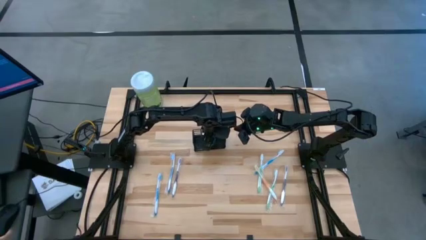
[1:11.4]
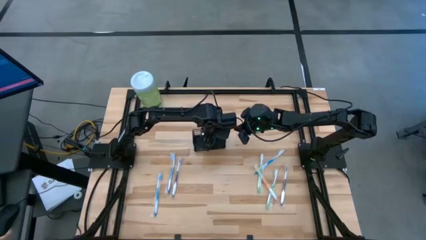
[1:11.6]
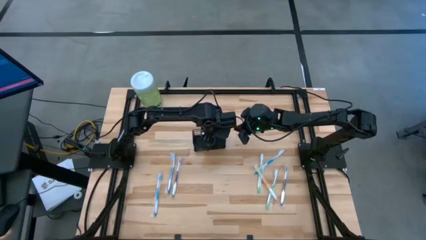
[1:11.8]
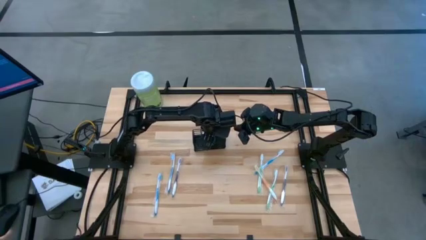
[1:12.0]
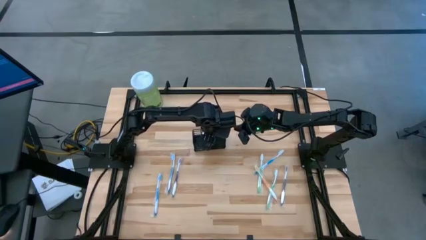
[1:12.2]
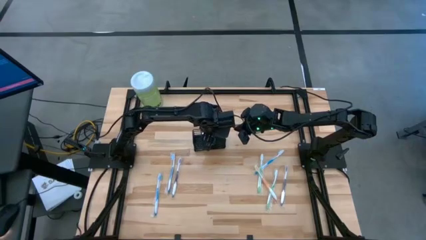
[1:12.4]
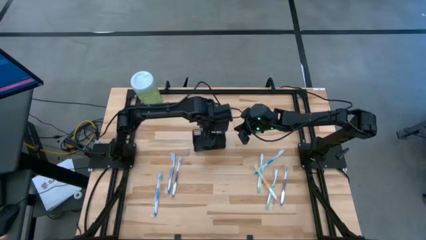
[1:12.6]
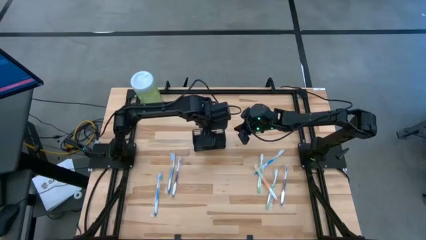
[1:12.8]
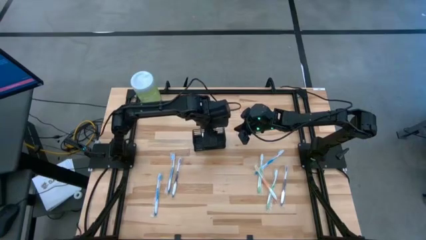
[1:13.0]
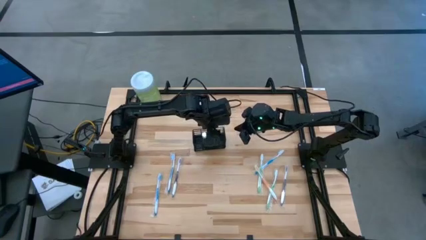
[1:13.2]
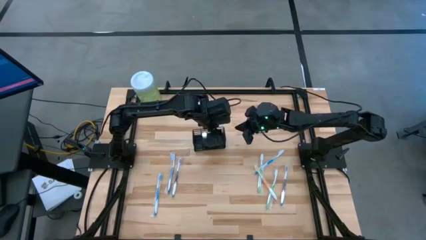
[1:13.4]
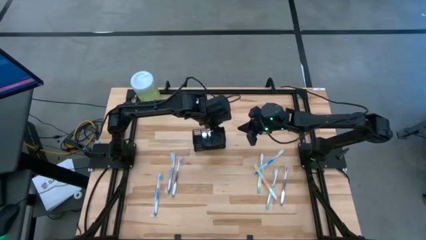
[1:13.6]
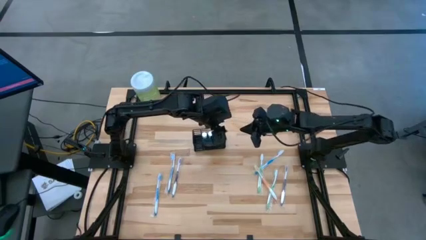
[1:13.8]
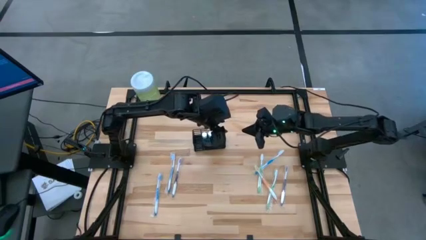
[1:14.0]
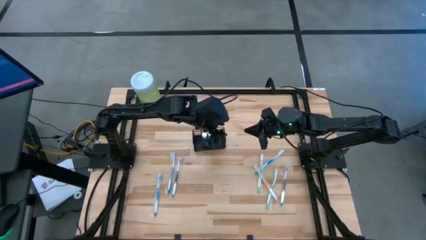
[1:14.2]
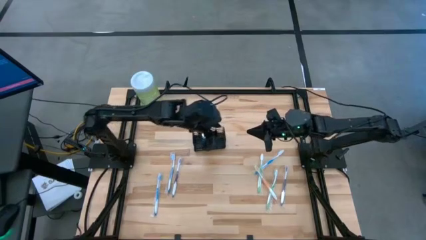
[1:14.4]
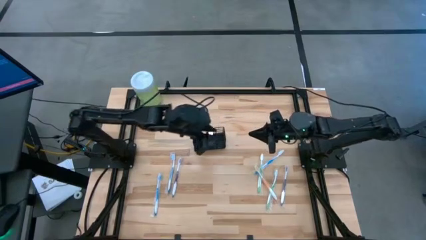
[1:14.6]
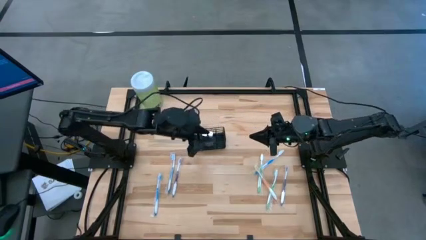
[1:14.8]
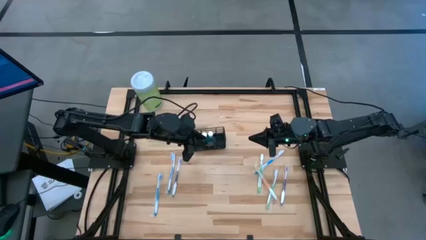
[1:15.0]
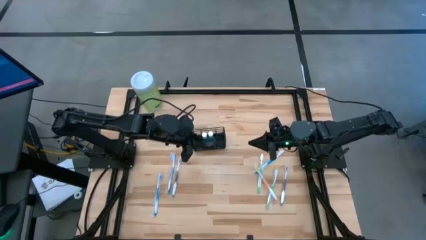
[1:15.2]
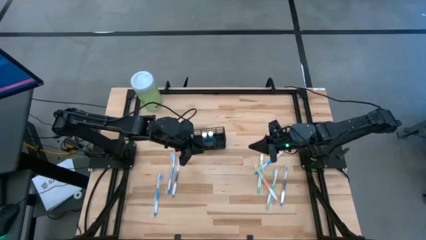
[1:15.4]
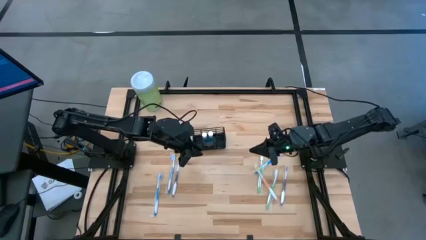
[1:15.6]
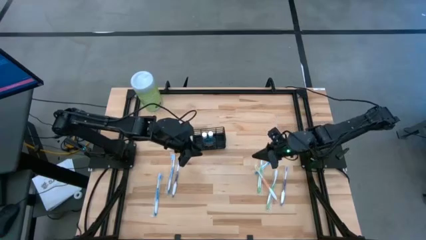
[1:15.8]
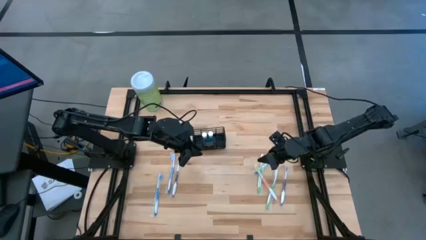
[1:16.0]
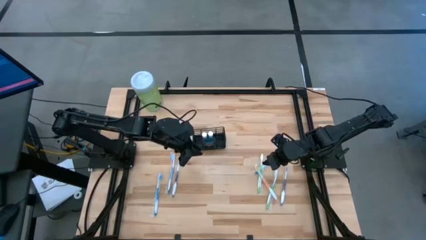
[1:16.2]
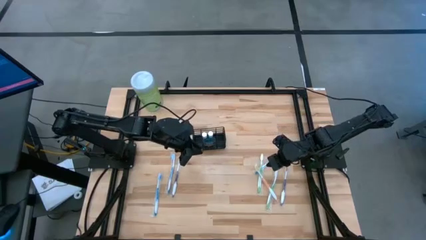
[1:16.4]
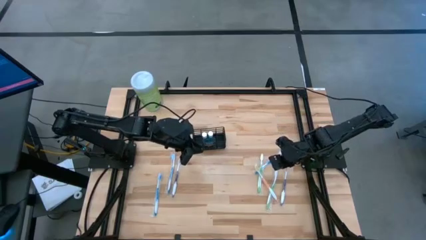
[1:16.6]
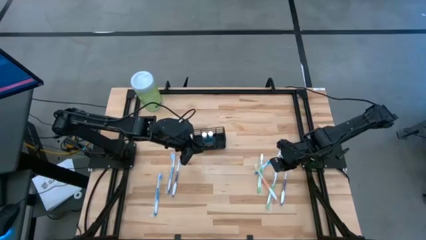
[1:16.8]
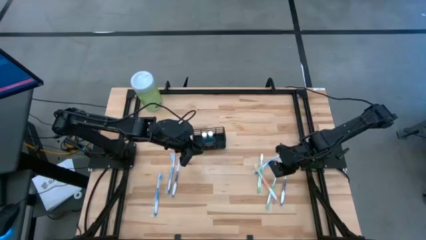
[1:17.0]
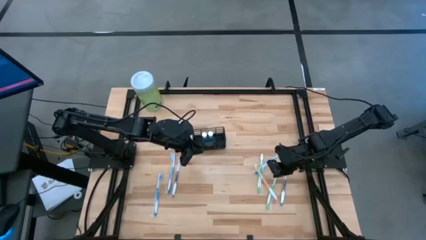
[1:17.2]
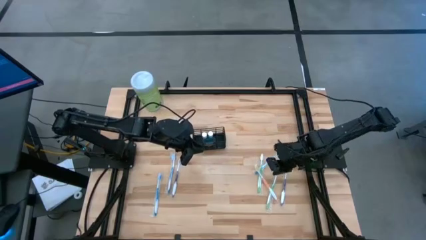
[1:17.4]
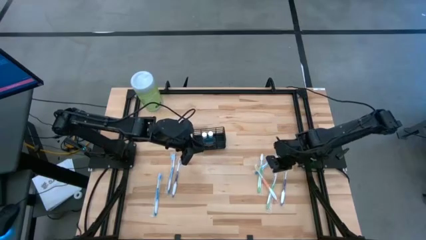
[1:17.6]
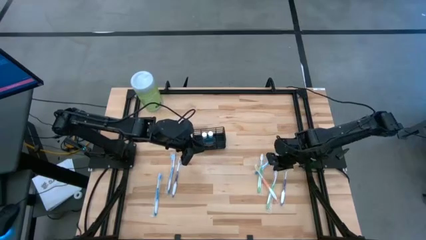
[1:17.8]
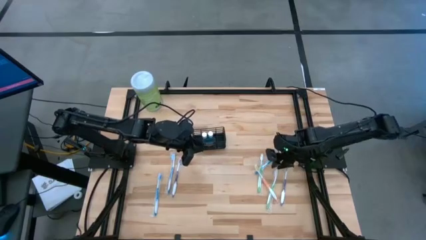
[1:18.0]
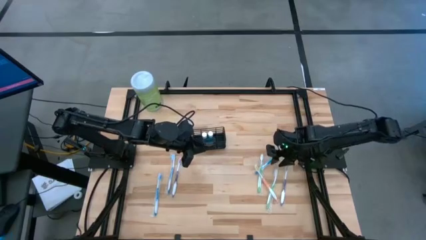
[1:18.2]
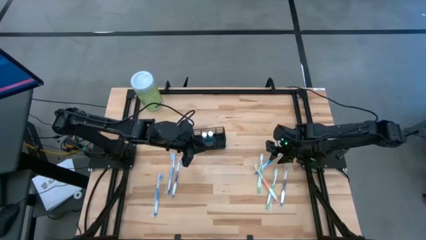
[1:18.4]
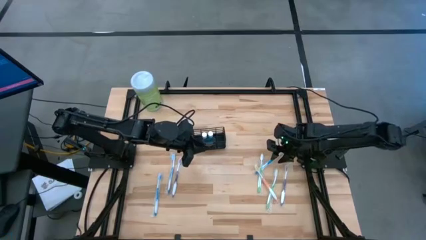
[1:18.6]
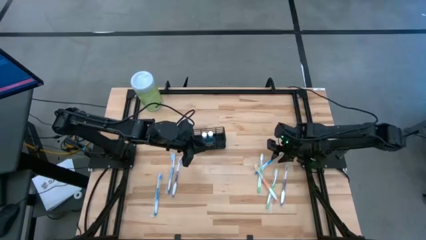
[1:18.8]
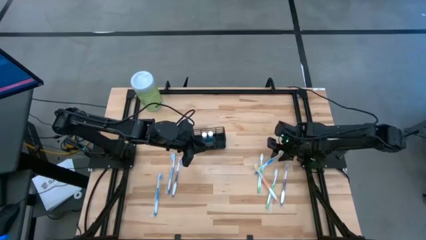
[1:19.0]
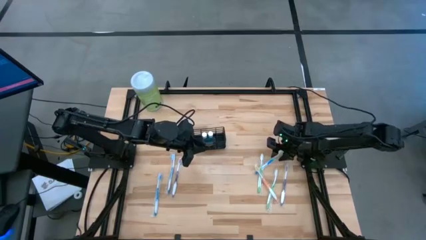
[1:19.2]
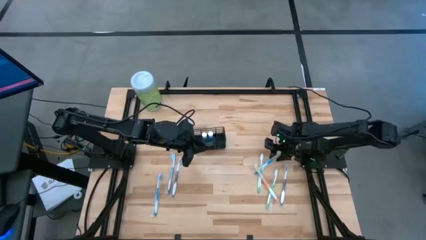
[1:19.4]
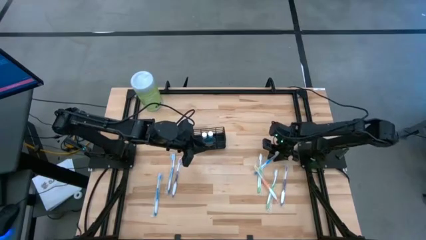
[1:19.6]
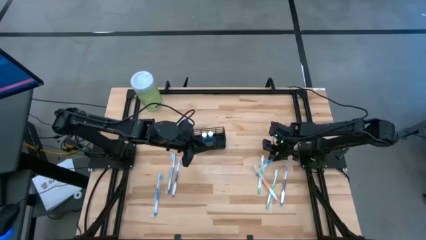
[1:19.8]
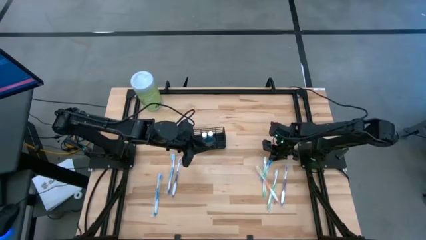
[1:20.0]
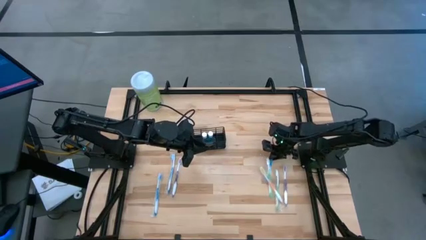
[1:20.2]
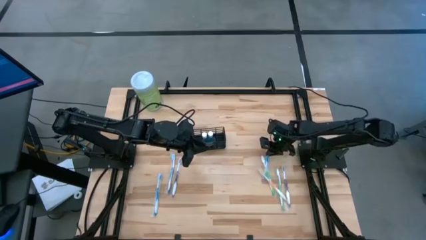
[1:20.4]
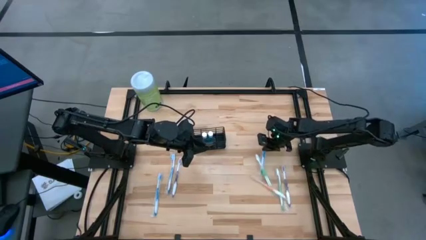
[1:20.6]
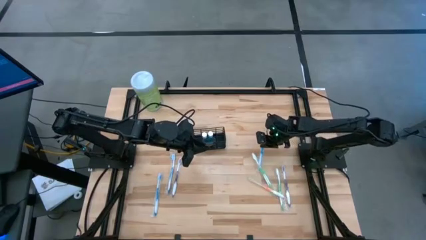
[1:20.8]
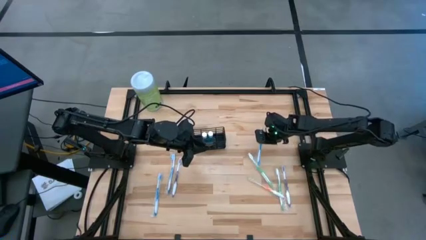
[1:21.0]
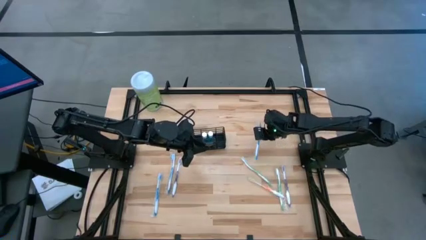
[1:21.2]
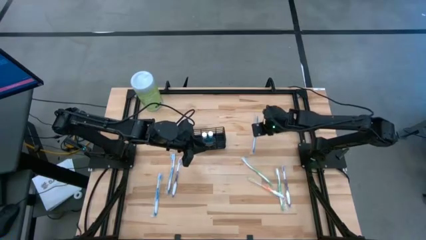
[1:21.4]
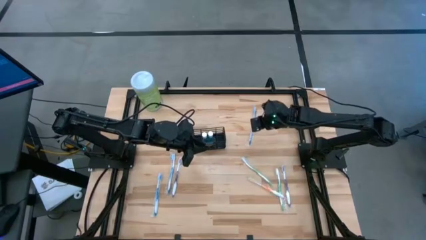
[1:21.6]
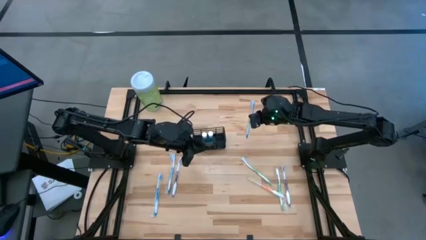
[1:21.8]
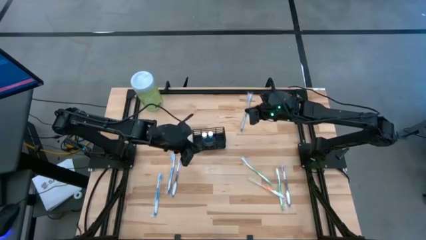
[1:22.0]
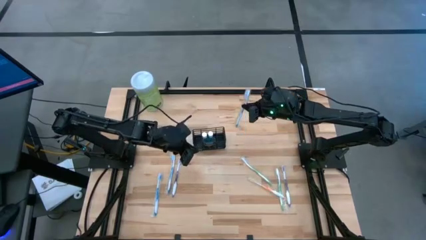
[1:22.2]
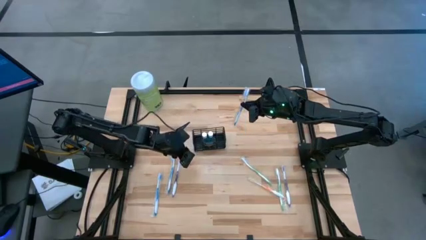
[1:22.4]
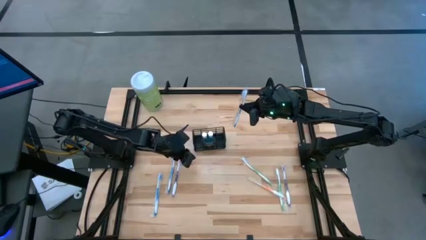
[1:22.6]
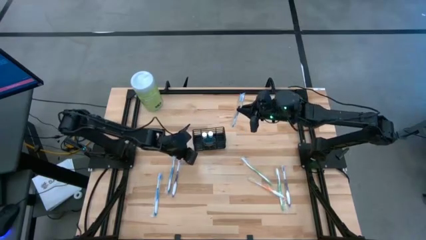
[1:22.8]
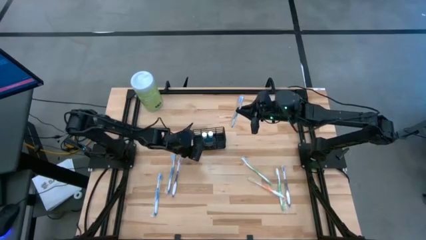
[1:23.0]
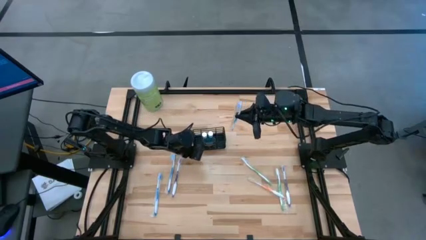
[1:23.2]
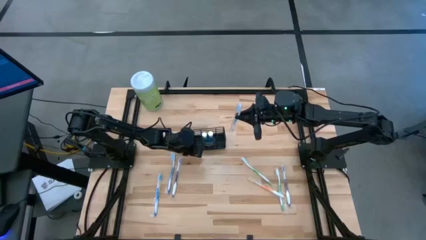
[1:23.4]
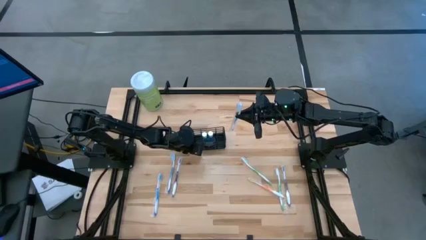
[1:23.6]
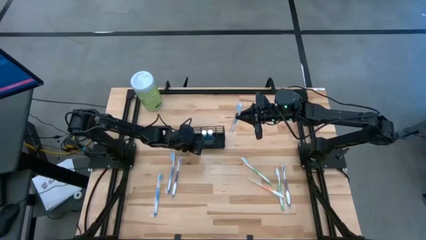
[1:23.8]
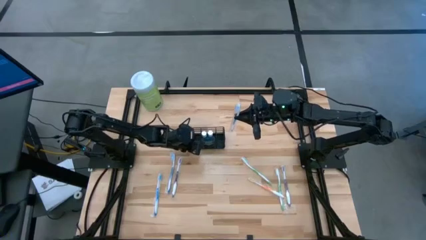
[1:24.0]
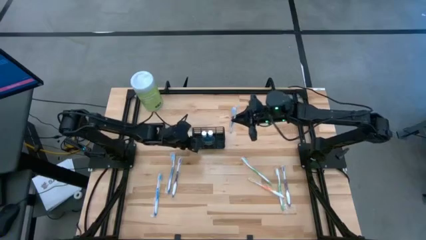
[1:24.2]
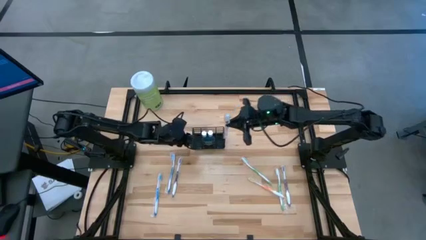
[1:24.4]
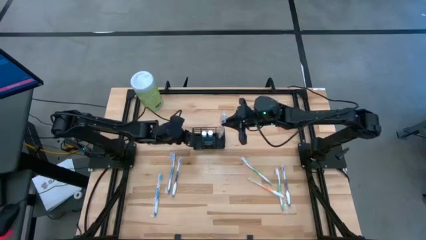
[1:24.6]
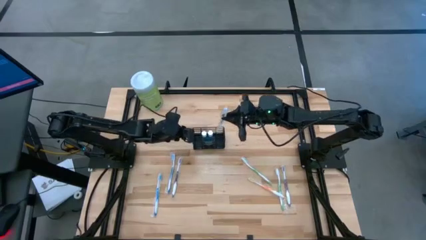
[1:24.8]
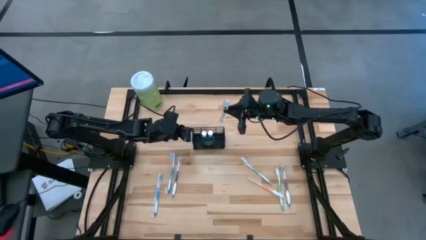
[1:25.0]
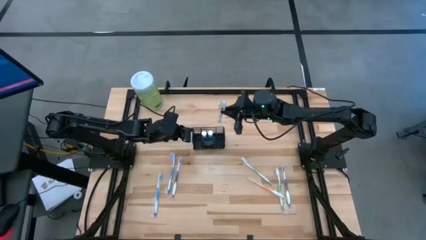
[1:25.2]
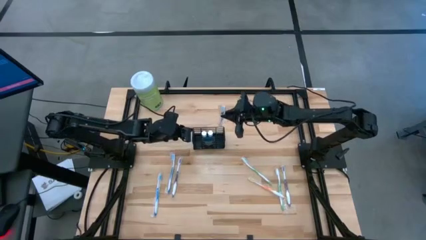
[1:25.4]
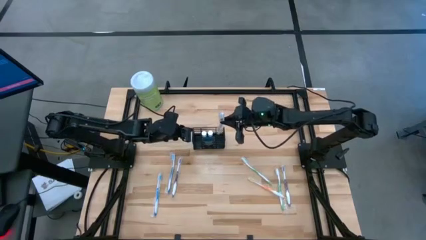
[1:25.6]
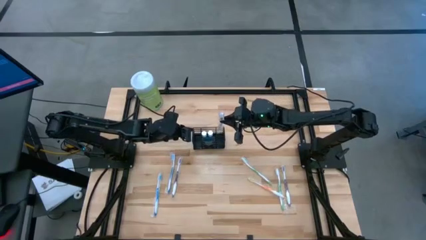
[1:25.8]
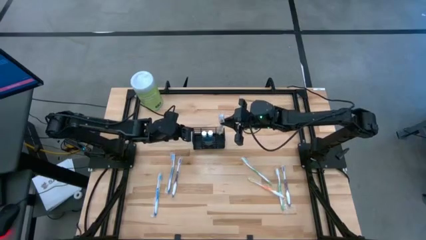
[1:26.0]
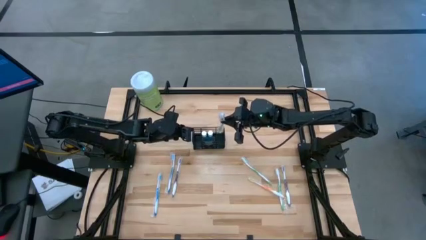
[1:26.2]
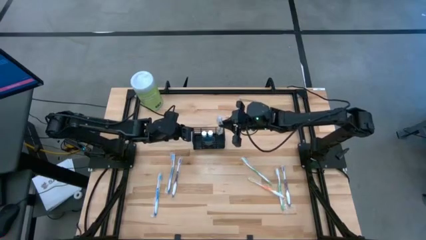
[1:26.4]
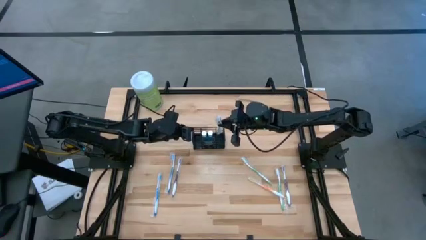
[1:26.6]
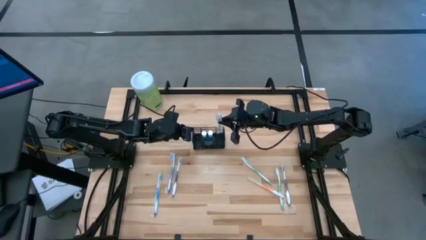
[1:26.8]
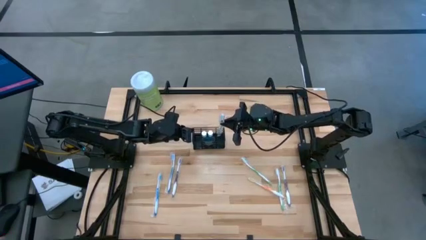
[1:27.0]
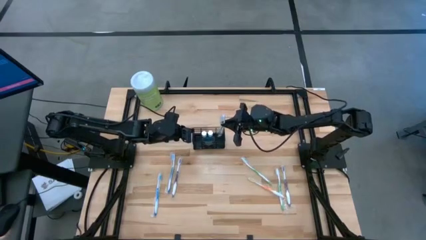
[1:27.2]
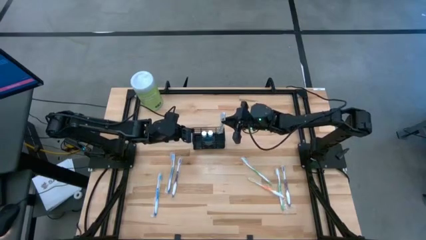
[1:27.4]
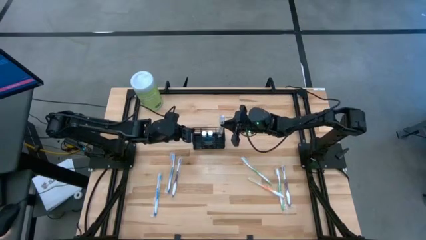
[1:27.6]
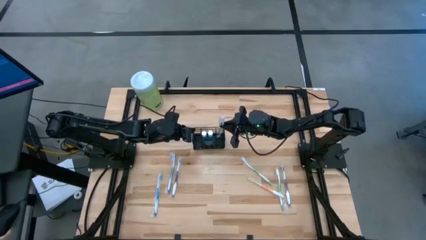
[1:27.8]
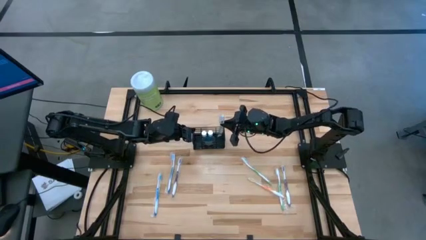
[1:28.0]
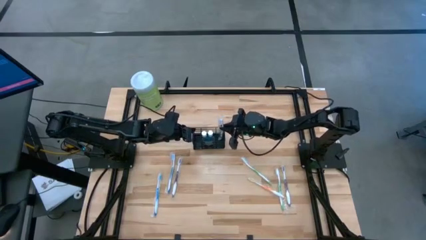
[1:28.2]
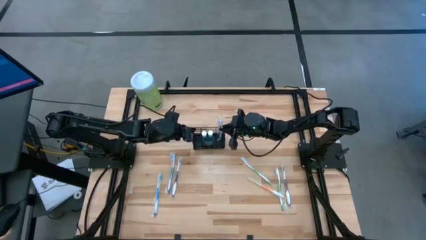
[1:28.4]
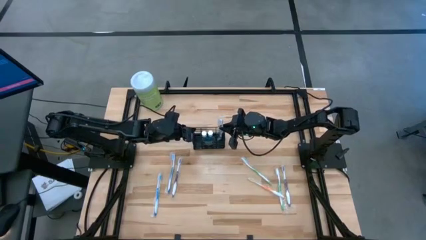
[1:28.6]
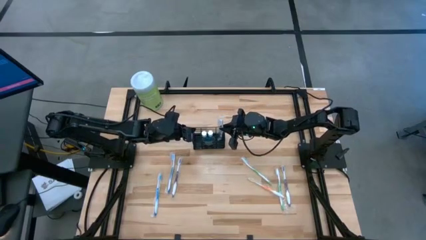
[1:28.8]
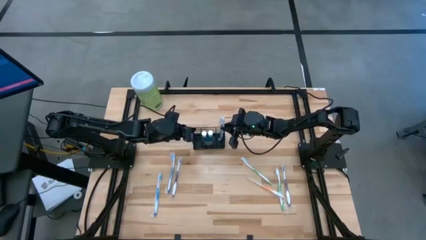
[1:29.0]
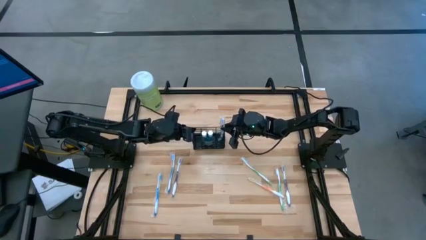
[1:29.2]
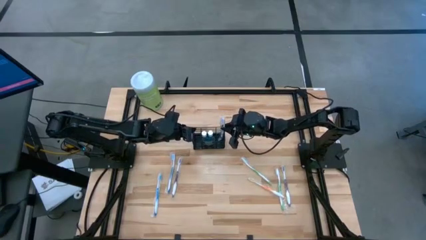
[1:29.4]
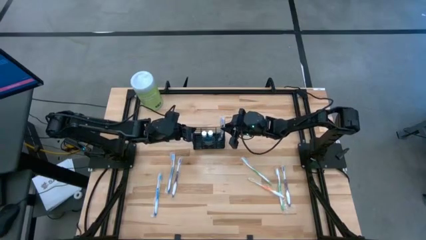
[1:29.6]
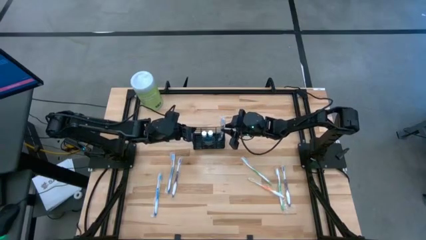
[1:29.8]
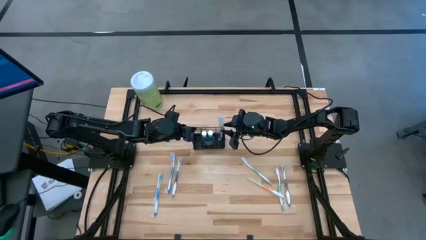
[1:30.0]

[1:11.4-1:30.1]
Task: Pick & Place toothbrushing station
Put the top right blue toothbrush into the black mesh organizer
